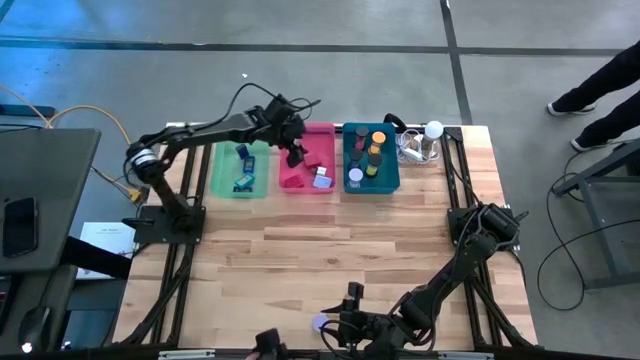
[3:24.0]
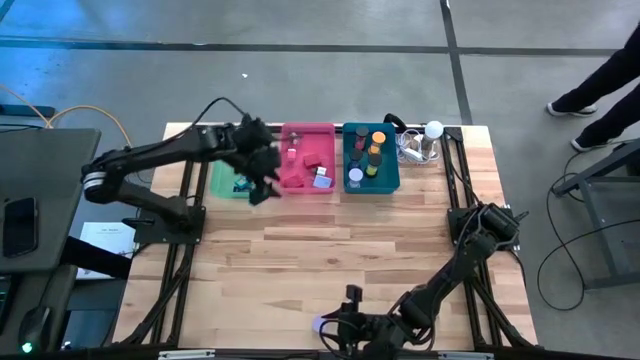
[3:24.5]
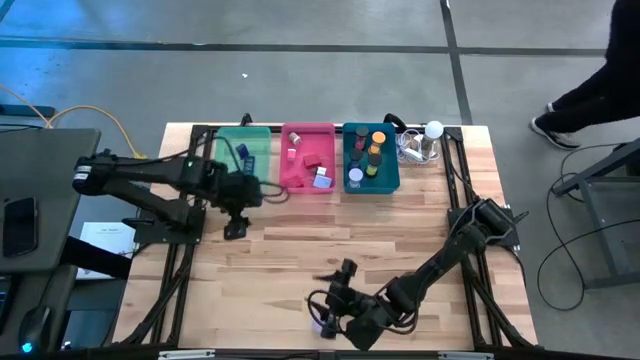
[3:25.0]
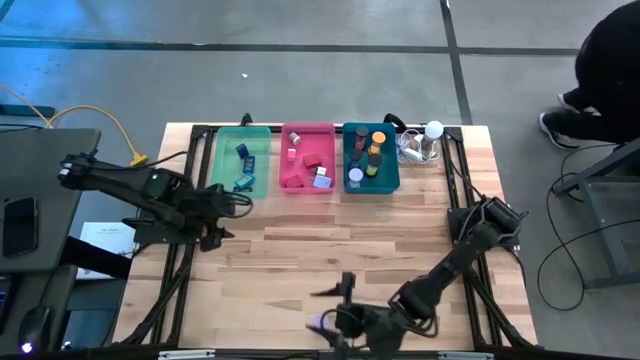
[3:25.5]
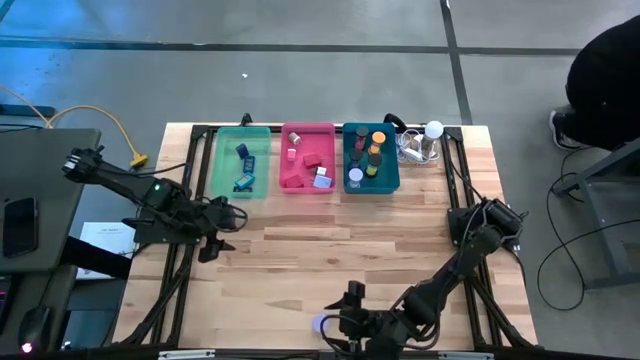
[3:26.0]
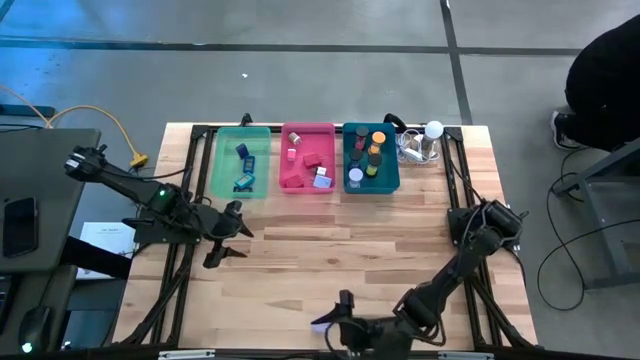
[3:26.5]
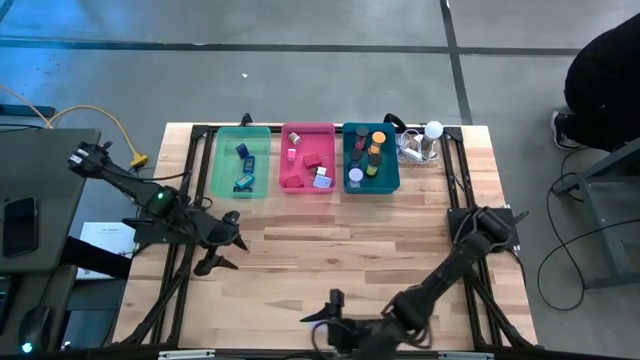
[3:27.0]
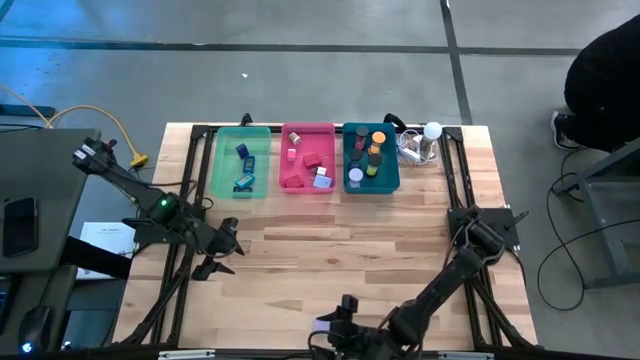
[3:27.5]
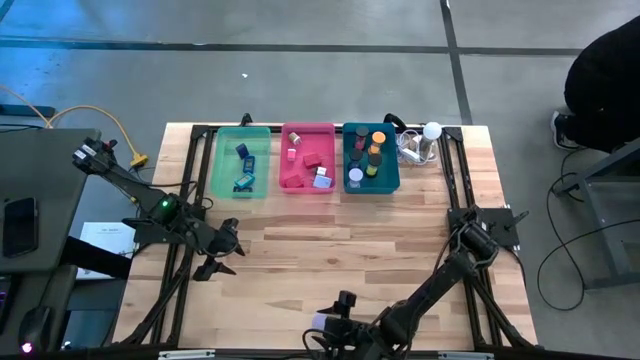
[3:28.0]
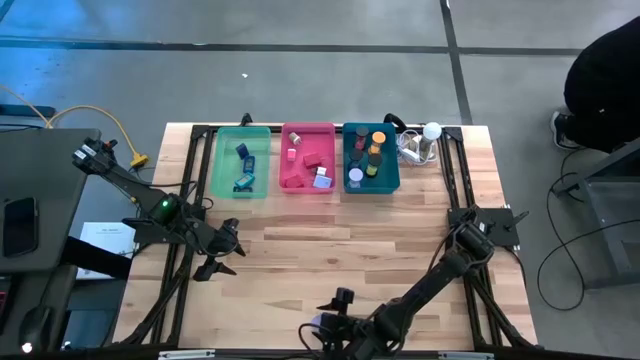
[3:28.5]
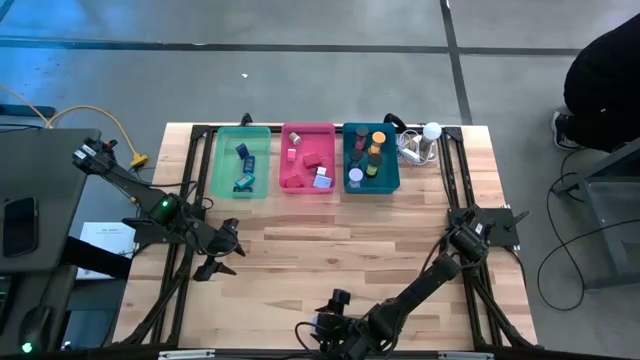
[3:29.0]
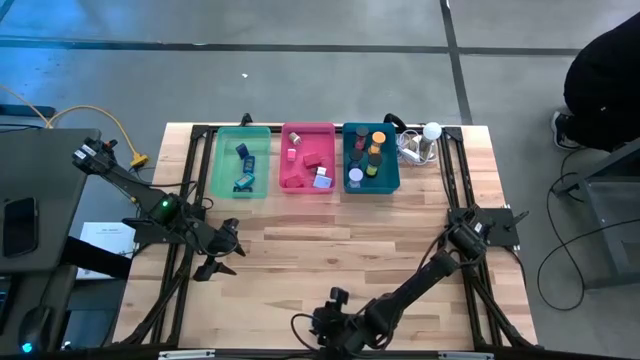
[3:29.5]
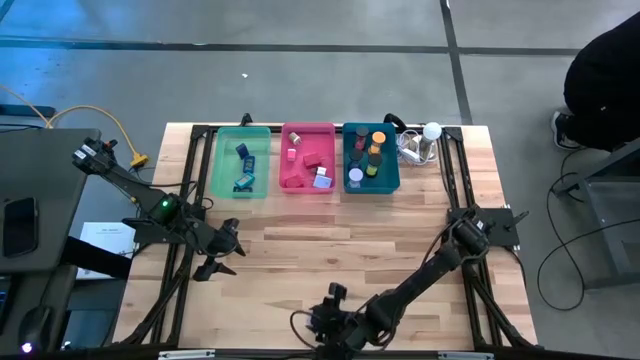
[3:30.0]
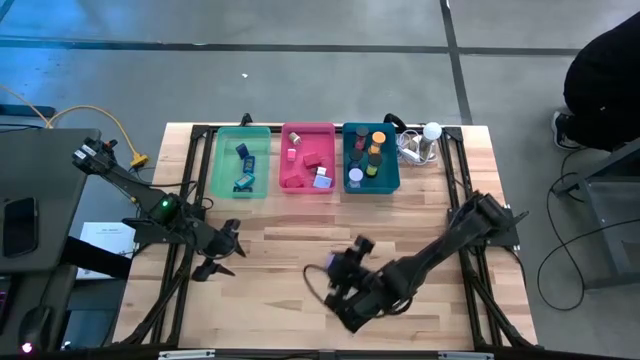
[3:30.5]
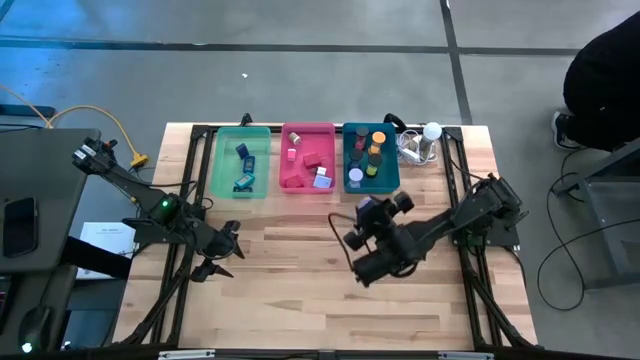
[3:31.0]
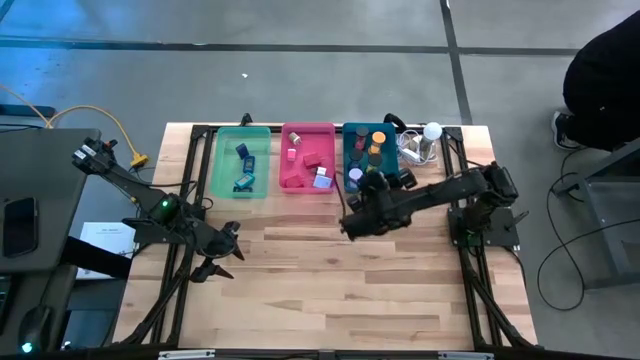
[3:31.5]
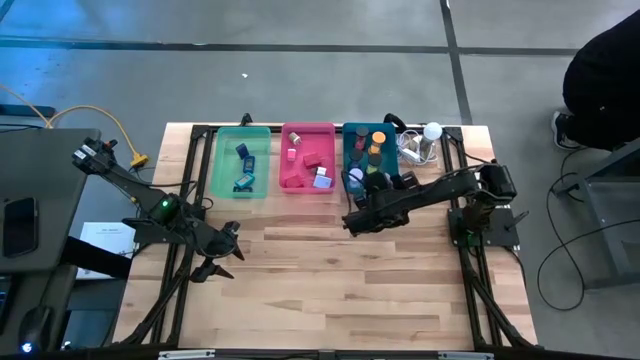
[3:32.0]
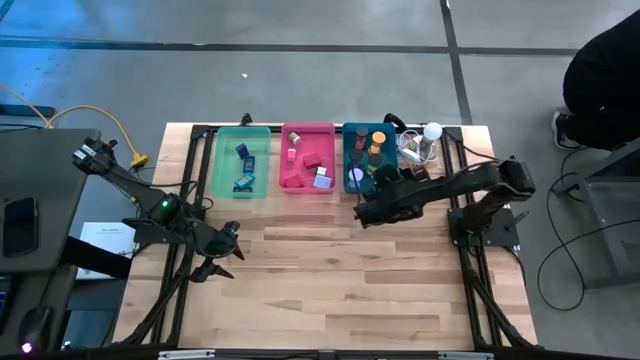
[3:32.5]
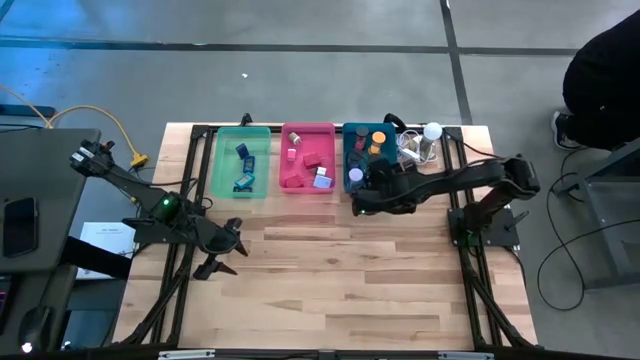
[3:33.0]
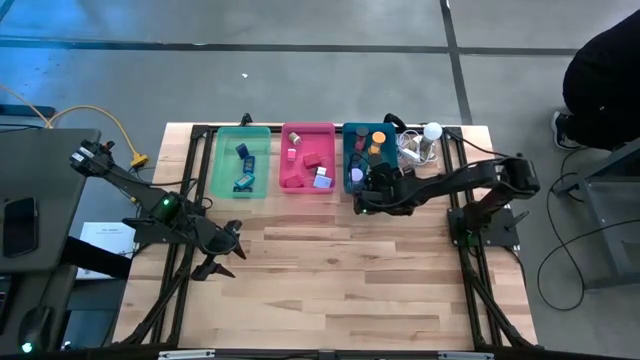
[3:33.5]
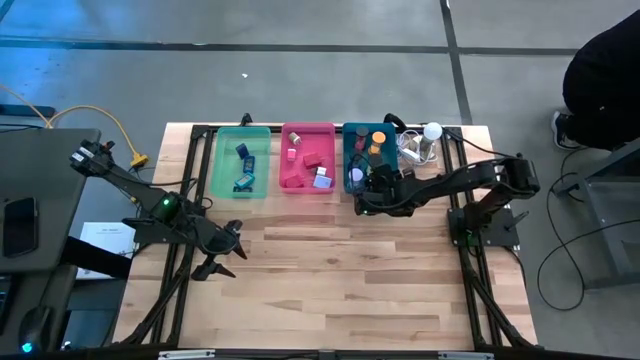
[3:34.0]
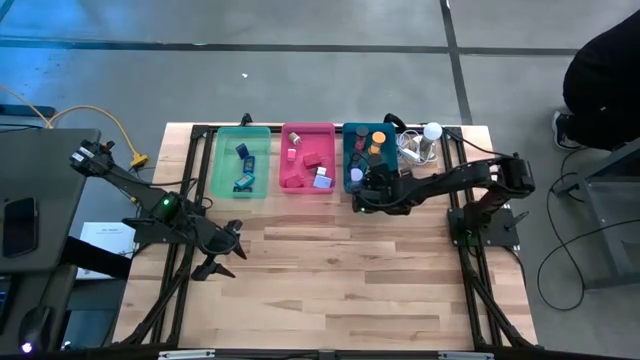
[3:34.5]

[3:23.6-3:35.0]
Task: Pick & Place Office items
Put the purple hourglass into the blue bin

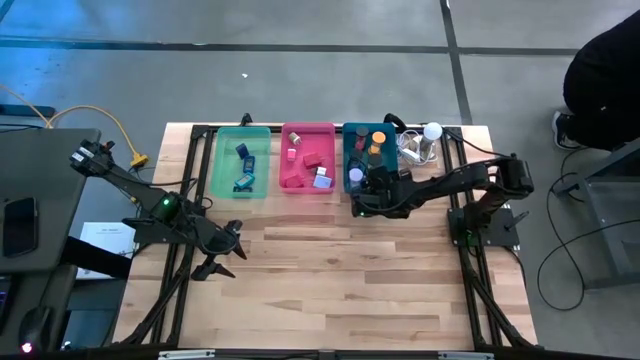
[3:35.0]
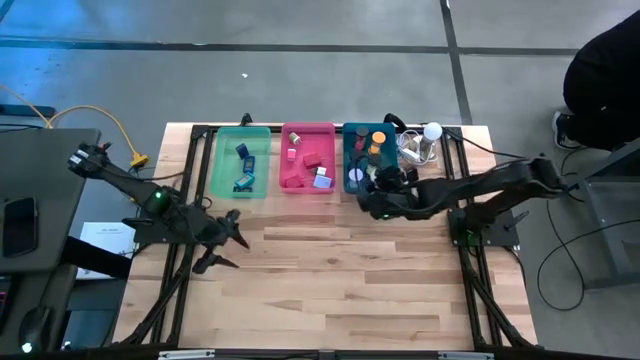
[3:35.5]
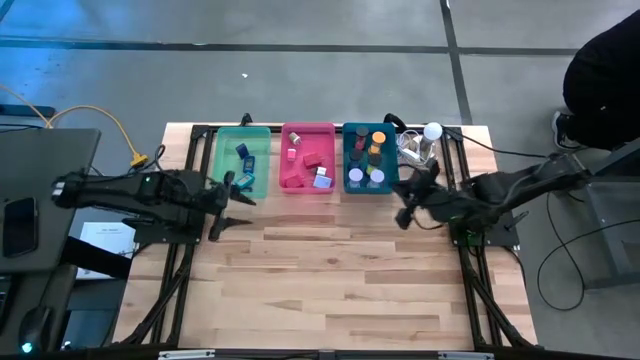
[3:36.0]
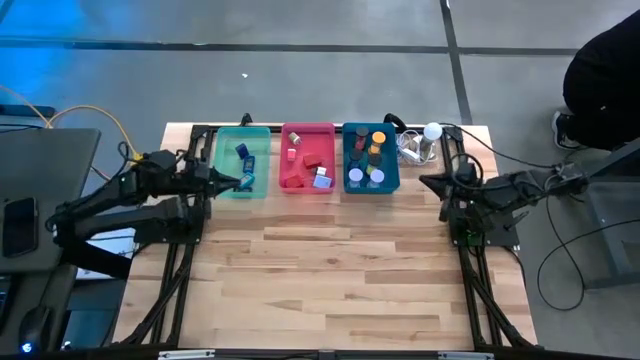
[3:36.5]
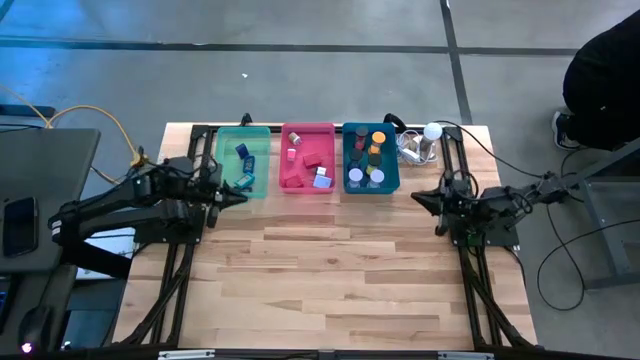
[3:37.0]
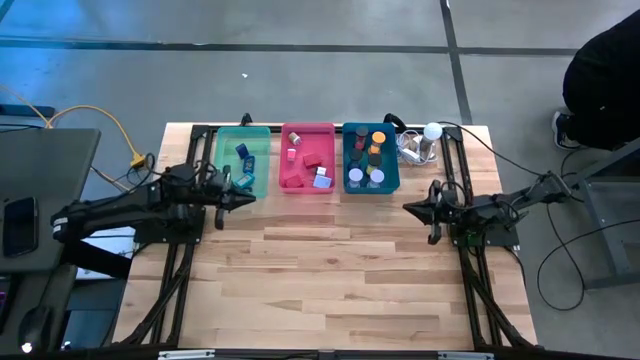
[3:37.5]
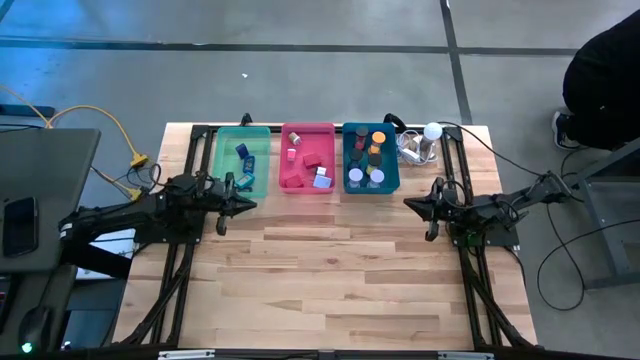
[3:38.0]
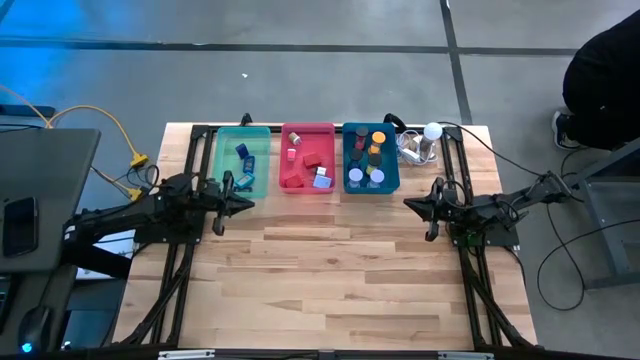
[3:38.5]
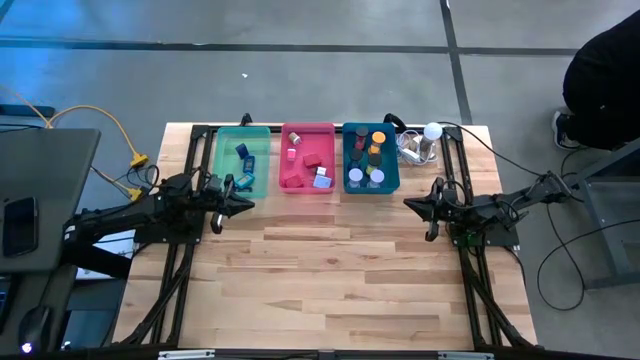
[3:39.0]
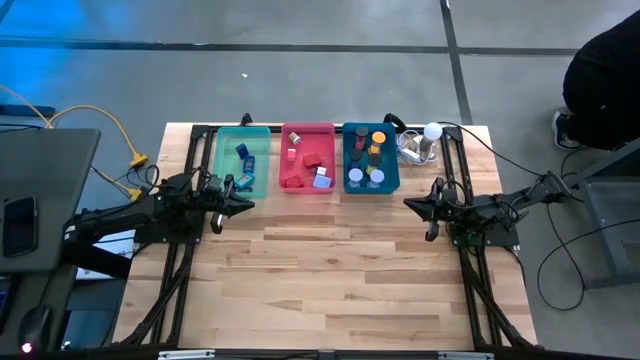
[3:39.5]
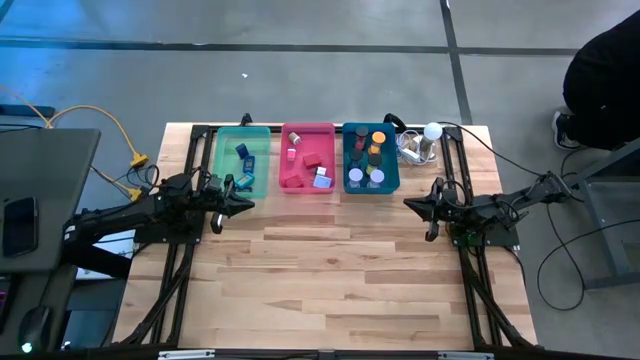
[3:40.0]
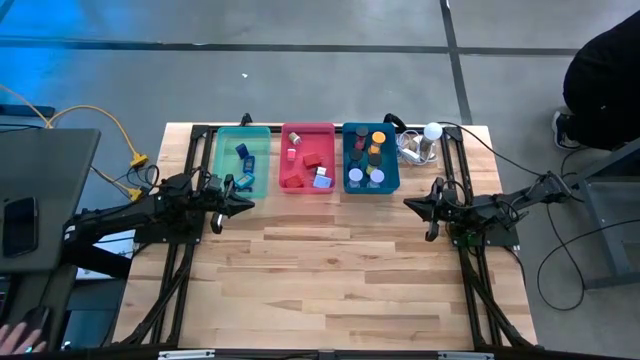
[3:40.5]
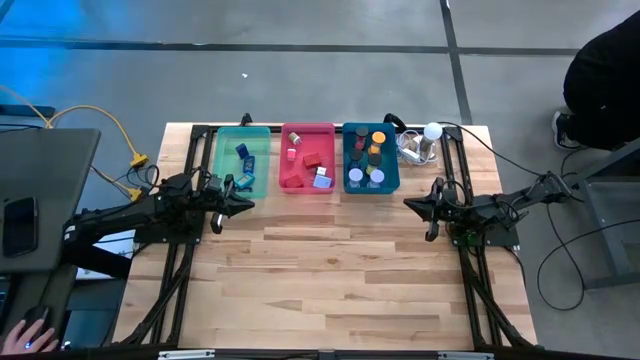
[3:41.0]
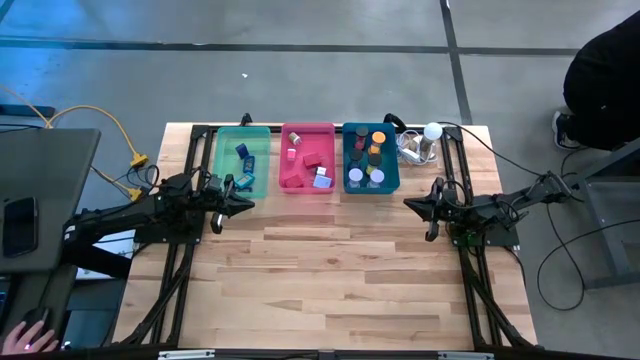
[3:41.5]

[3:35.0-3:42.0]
Return to Home Position

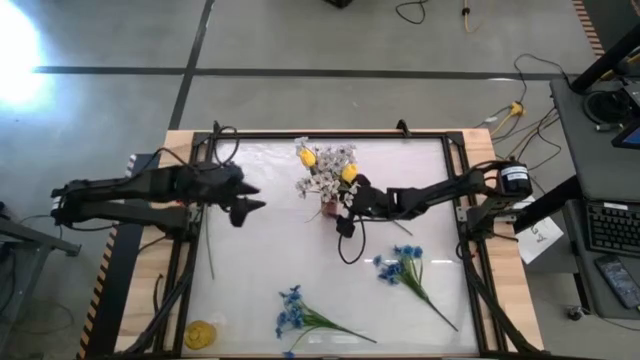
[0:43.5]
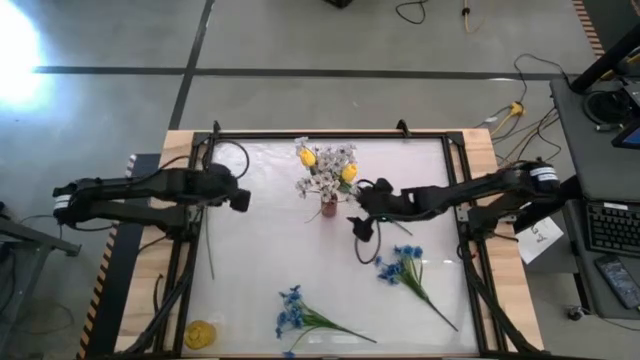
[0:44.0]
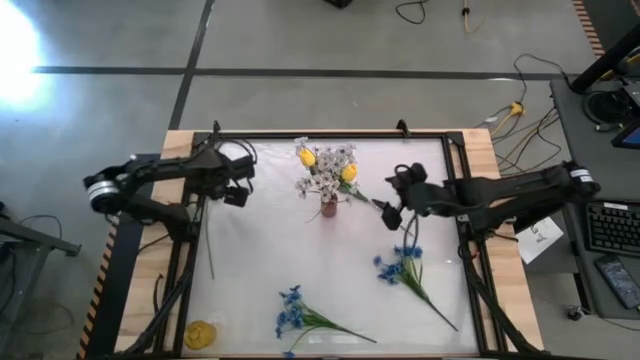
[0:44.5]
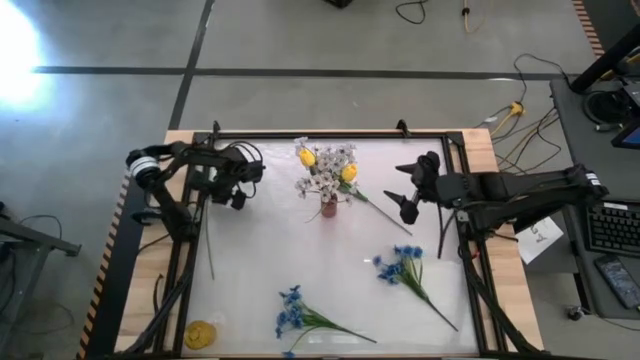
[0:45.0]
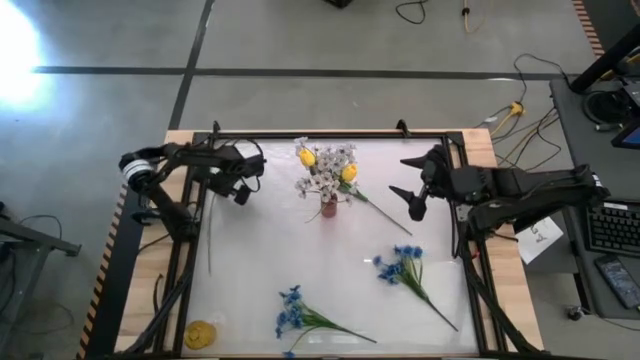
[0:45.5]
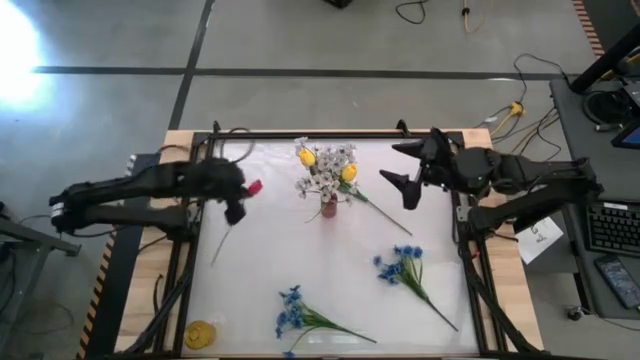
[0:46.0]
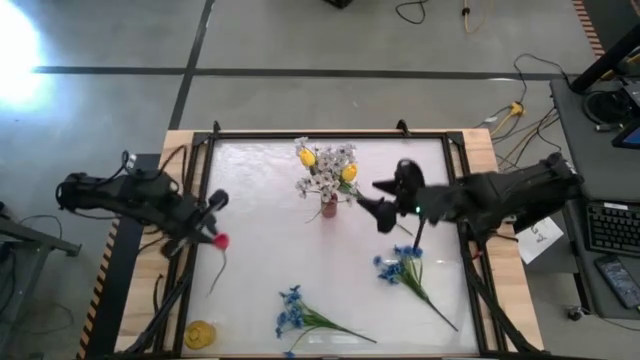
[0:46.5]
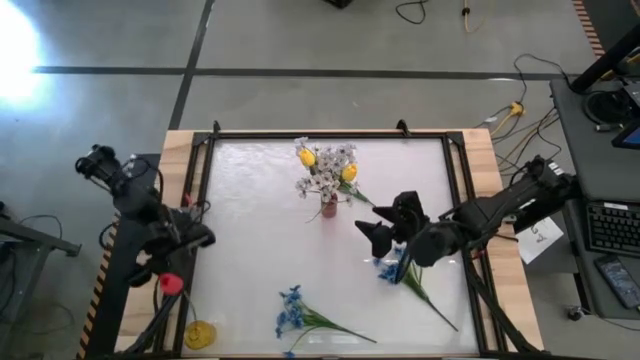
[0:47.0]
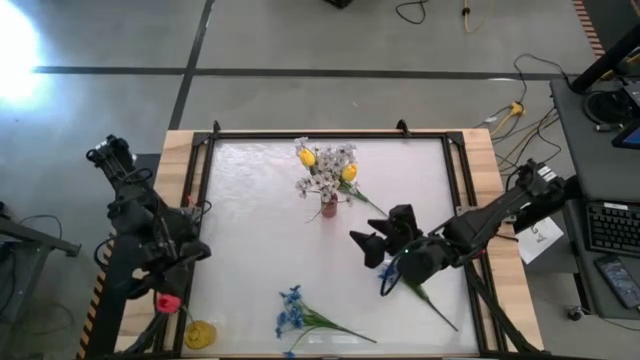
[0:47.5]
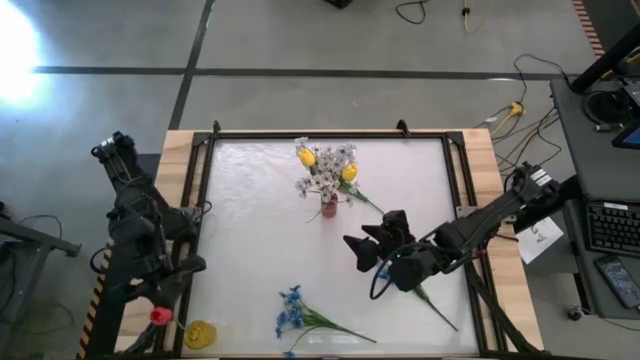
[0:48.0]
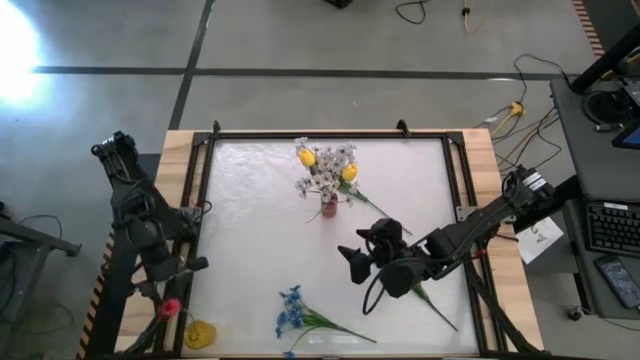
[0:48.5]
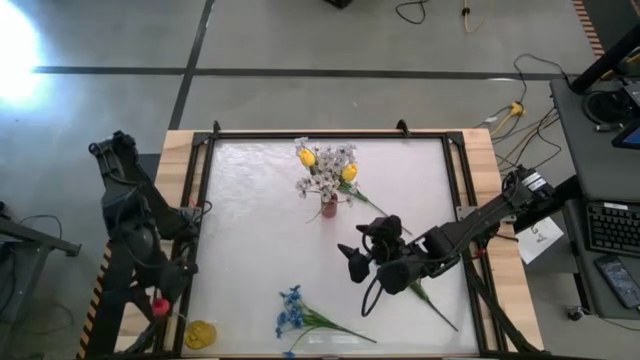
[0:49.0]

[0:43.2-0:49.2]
Task: Sort flowers into vase by color
Put the left red tulip into the yellow flower vase
